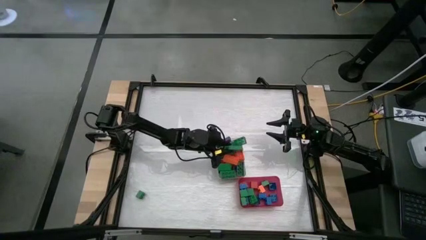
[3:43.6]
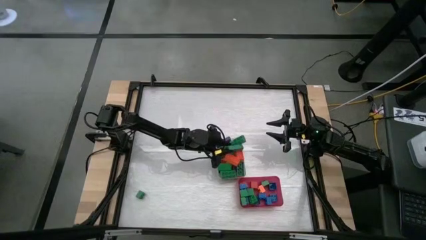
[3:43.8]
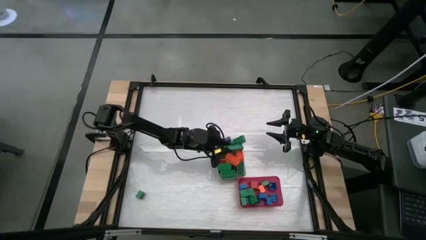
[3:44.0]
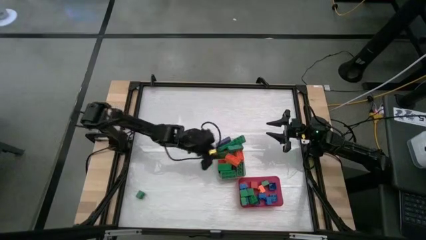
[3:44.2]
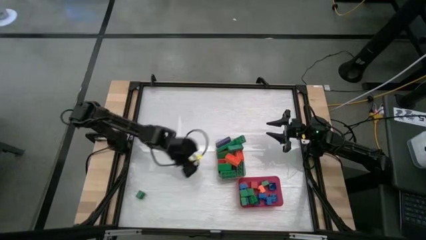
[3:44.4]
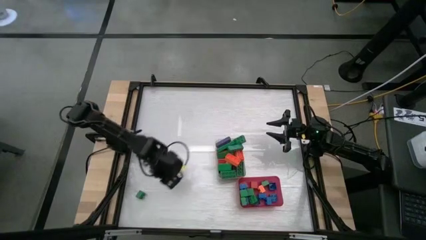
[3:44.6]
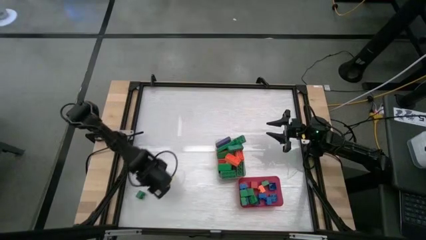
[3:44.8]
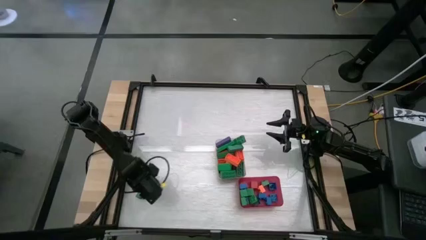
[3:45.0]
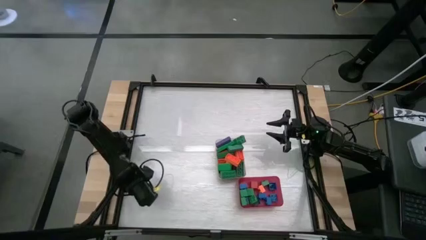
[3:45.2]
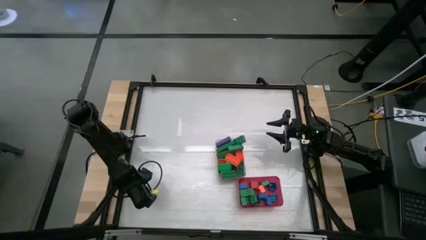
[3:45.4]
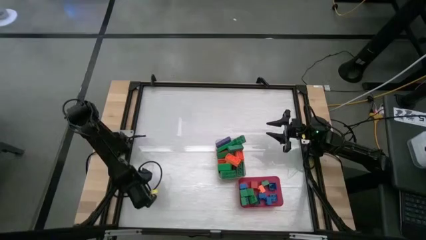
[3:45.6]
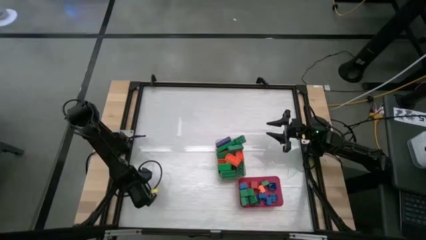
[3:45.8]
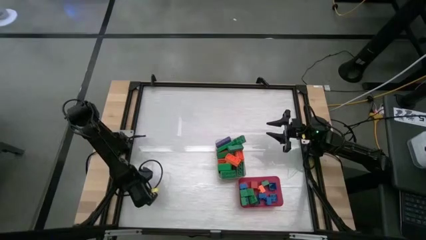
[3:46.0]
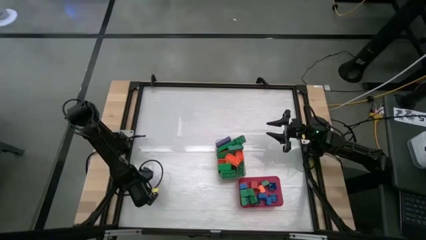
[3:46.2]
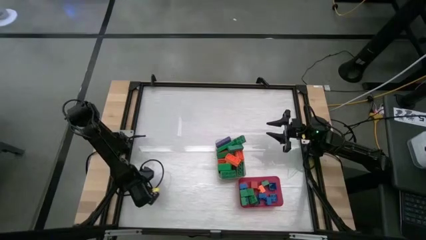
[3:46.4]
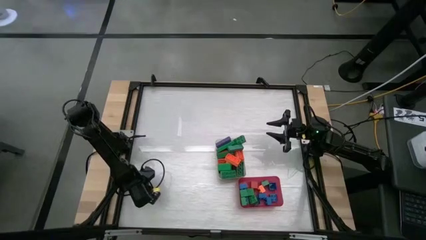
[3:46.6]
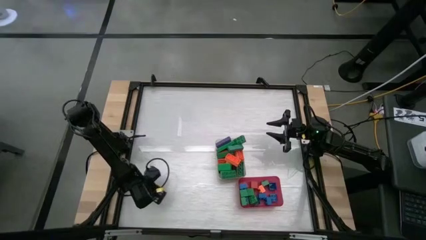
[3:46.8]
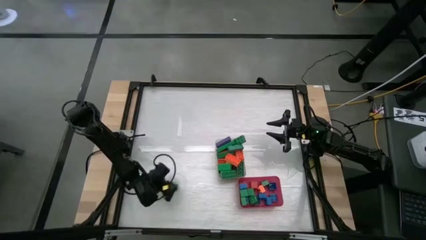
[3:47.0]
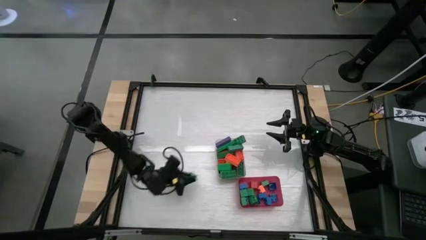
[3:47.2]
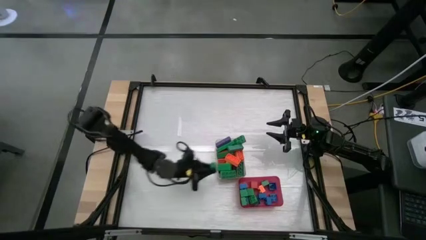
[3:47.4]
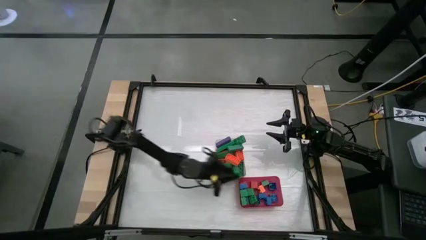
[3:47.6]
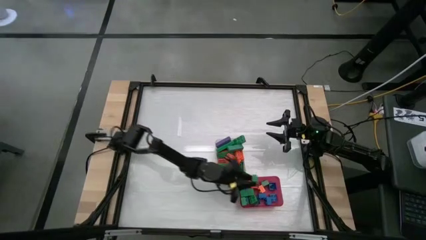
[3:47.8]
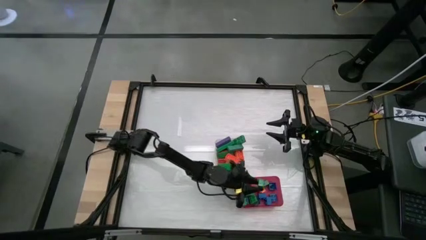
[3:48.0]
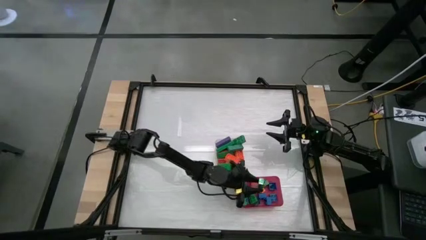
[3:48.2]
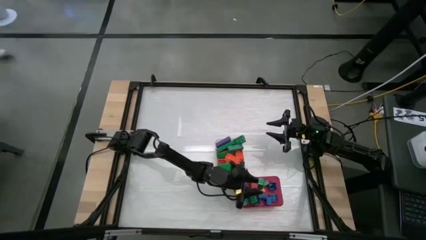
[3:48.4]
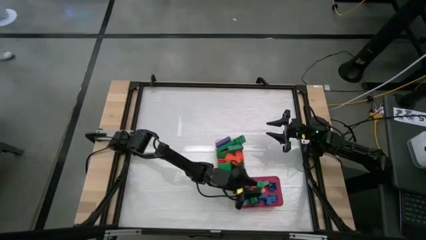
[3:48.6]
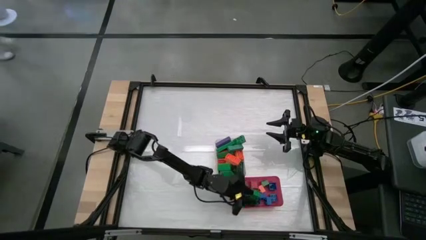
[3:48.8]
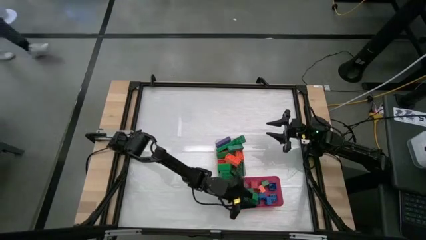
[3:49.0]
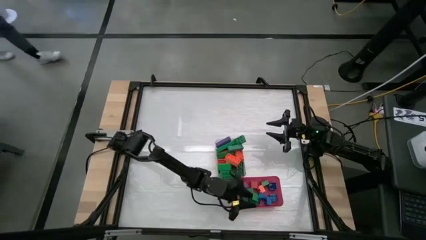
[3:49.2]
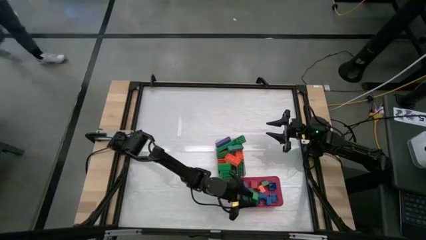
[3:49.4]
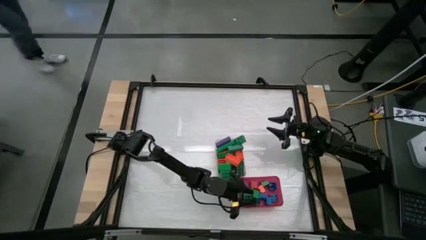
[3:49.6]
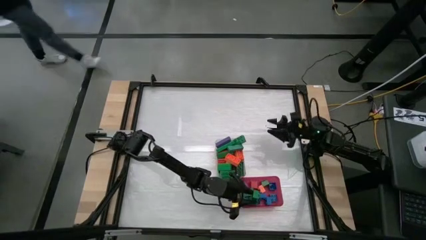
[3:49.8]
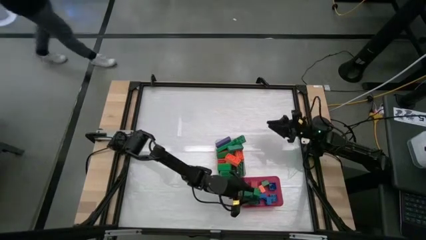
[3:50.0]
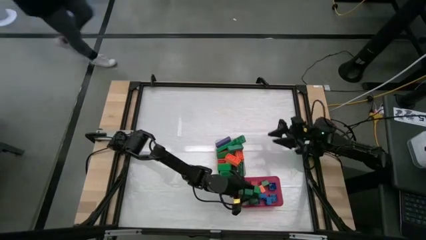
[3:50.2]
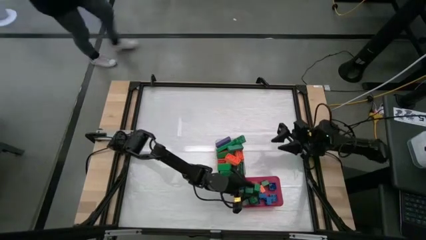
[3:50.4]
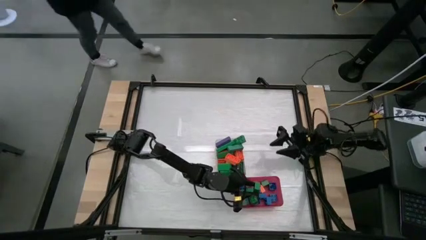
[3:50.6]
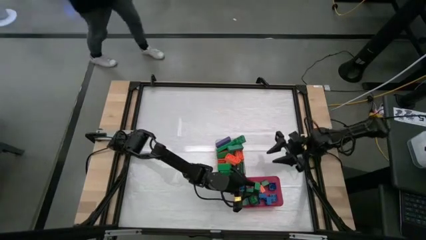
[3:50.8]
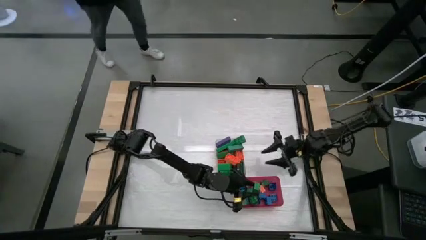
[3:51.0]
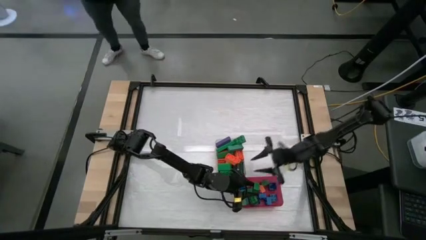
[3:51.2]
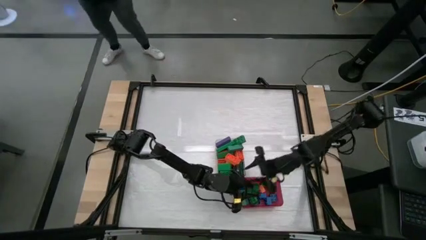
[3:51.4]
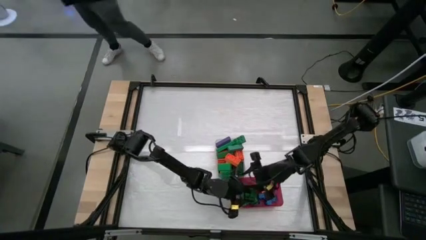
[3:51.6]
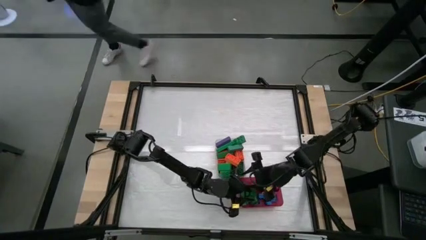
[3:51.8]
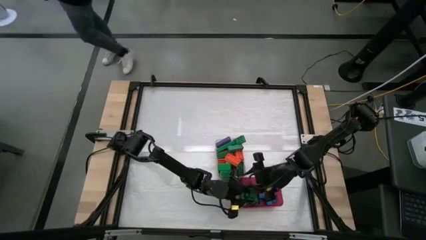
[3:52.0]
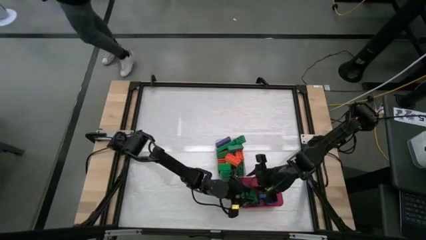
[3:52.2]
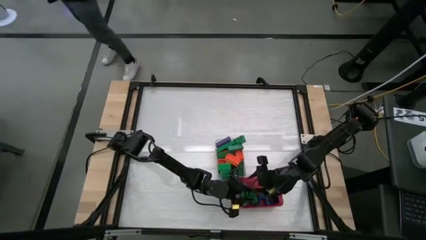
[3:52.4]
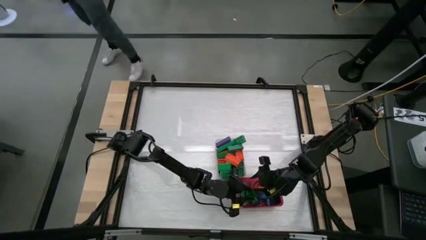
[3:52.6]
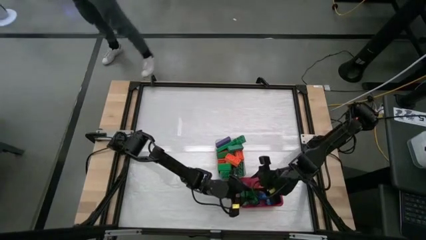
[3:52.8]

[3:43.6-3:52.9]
Task: Sort blocks by size
Put the green square game piece into the red bin

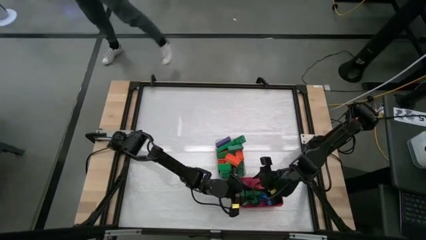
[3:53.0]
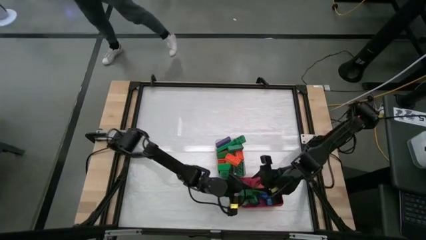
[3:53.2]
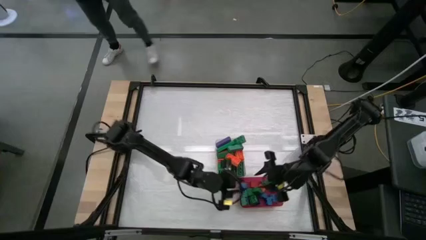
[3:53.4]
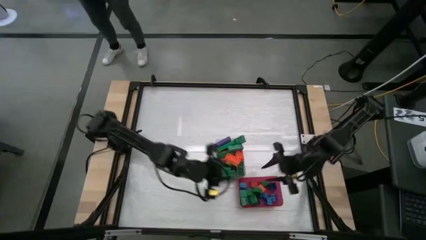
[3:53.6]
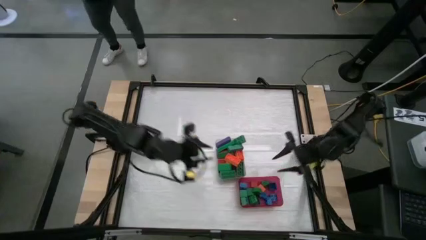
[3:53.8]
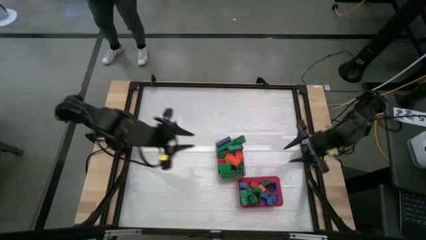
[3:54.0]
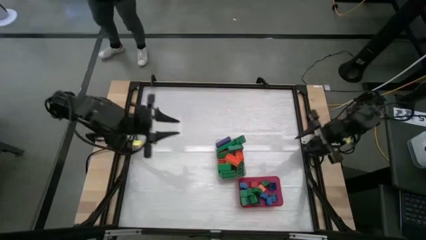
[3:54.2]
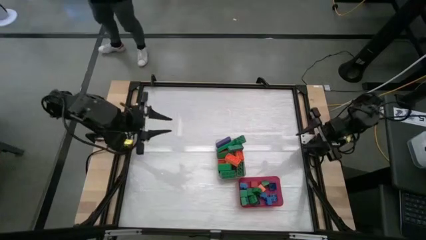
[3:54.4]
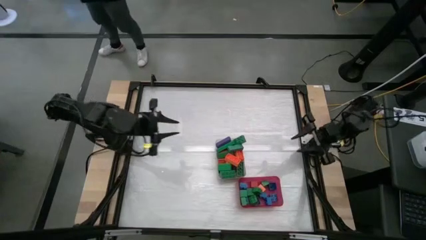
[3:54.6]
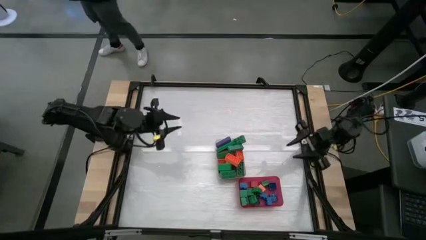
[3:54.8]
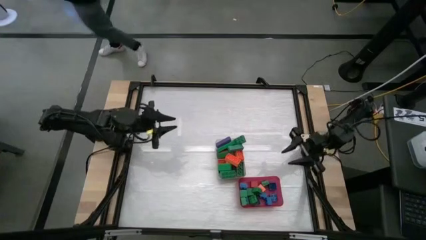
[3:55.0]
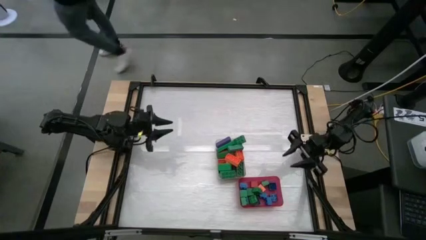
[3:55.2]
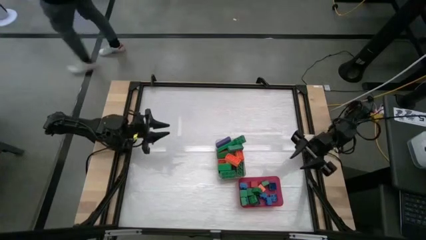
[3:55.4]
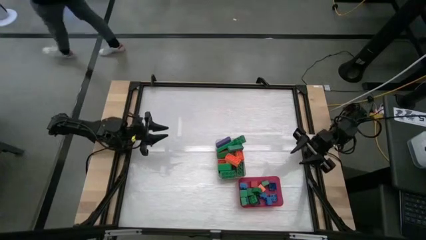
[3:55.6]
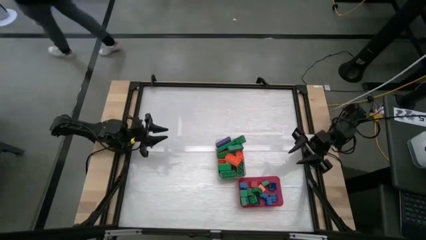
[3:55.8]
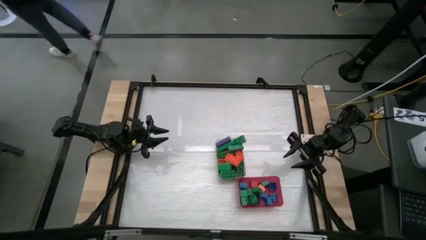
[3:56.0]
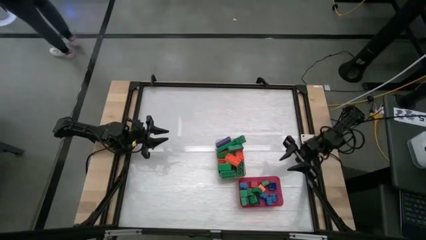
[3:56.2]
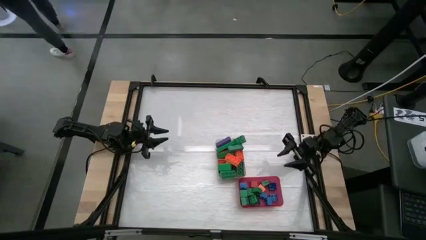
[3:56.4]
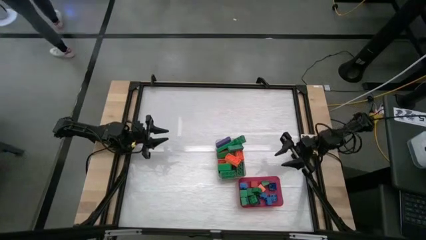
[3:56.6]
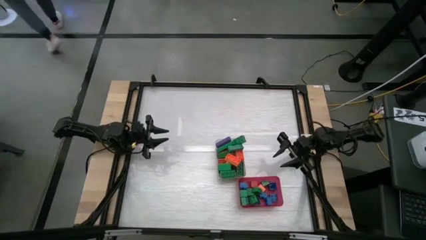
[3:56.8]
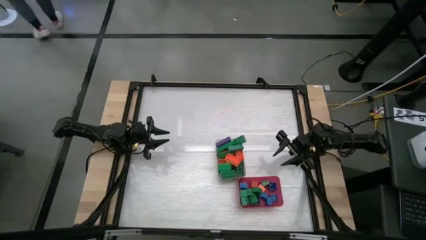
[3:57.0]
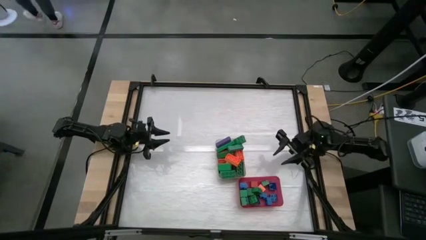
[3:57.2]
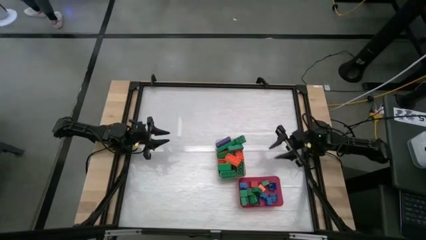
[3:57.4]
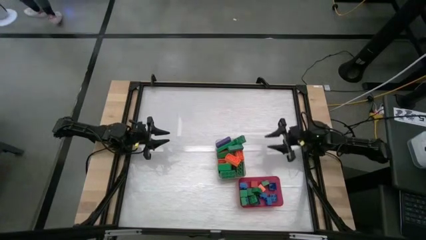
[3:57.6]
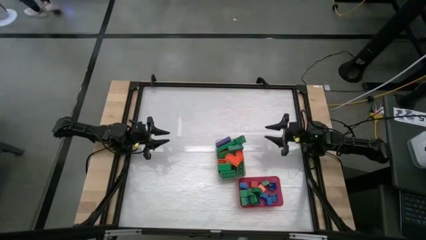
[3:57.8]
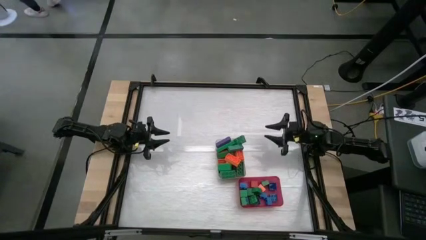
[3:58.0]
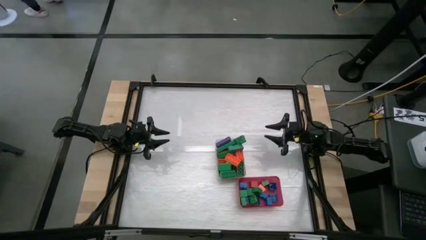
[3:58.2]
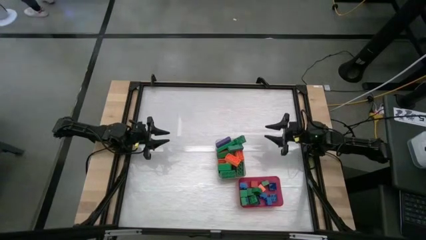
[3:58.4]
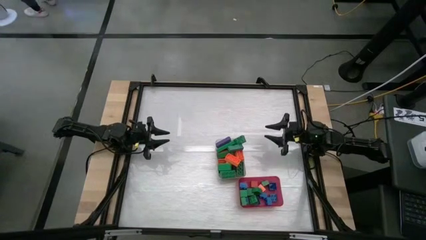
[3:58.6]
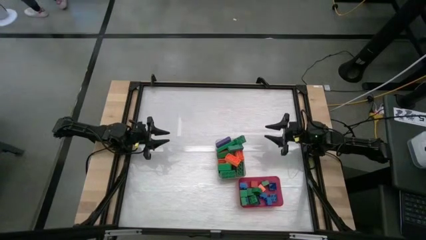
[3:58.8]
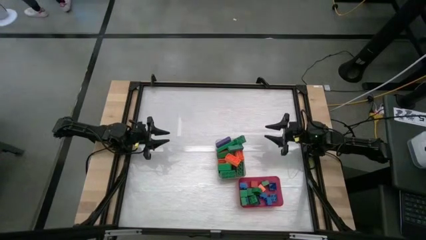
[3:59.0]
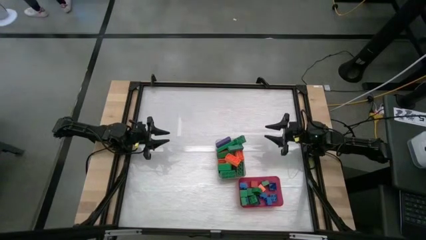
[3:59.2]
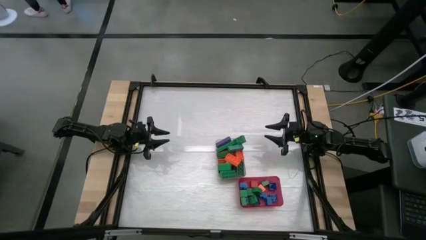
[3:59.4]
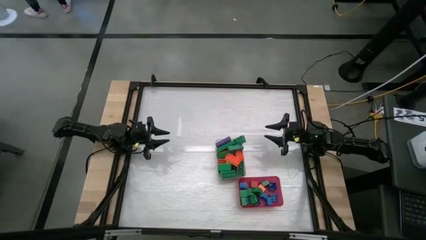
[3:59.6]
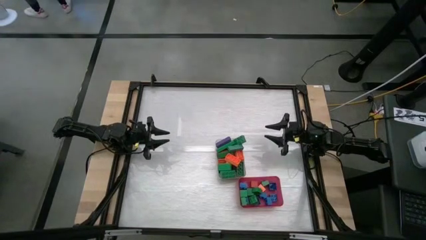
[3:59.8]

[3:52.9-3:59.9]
Return to Home Position
